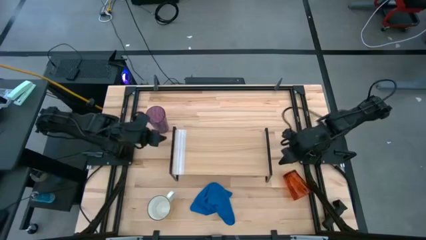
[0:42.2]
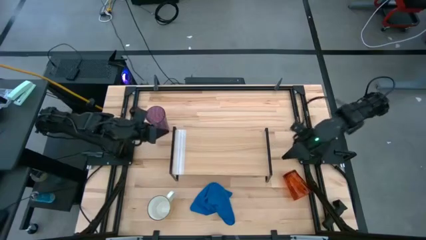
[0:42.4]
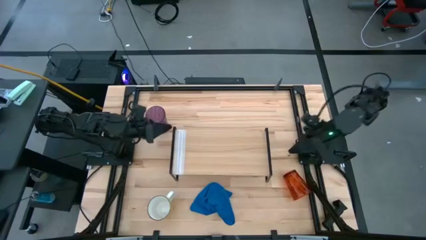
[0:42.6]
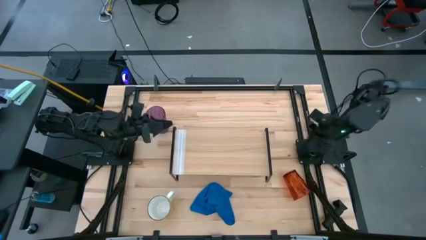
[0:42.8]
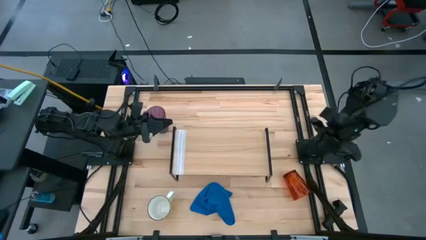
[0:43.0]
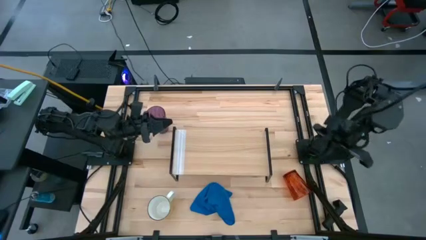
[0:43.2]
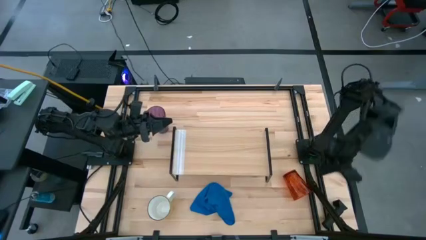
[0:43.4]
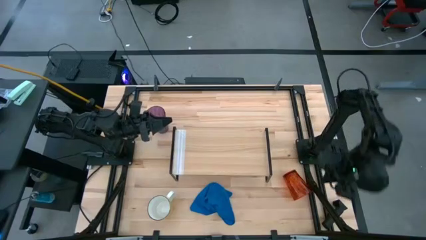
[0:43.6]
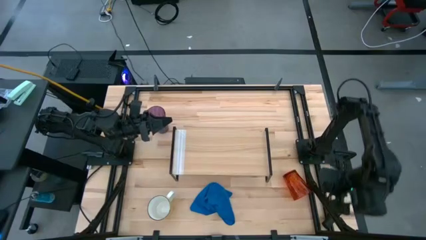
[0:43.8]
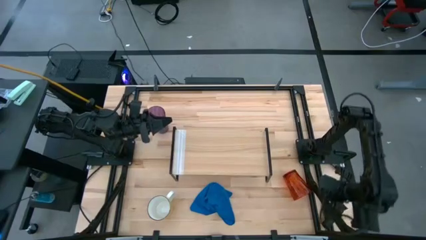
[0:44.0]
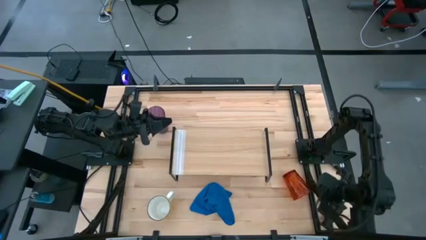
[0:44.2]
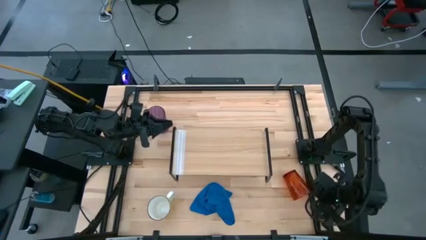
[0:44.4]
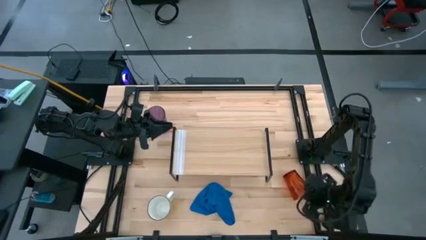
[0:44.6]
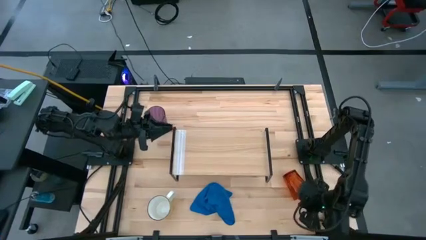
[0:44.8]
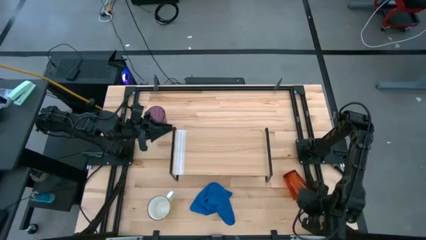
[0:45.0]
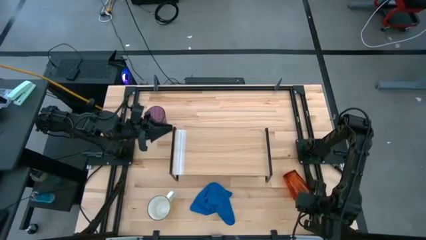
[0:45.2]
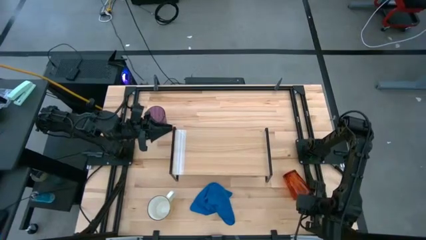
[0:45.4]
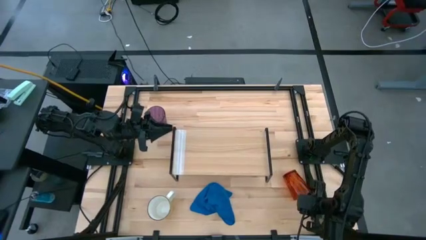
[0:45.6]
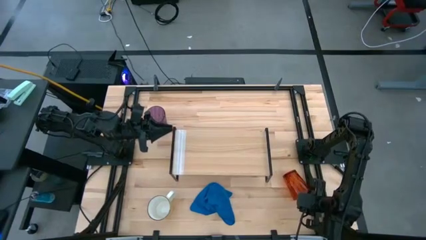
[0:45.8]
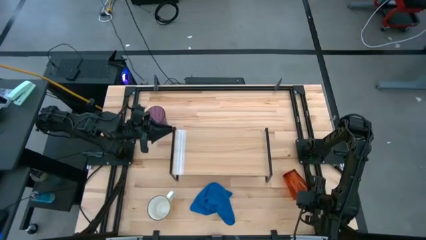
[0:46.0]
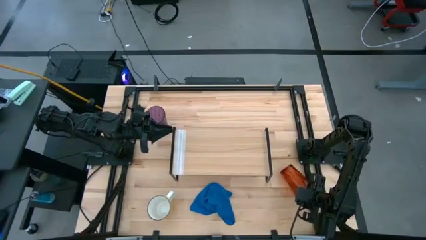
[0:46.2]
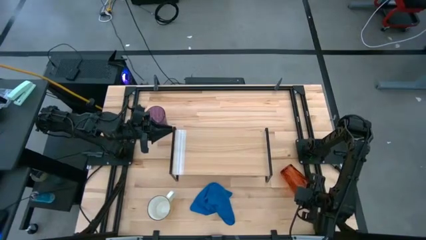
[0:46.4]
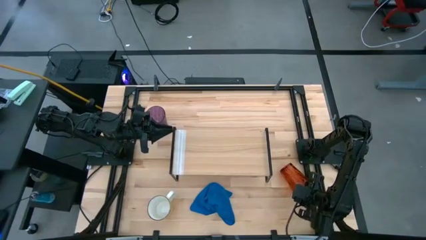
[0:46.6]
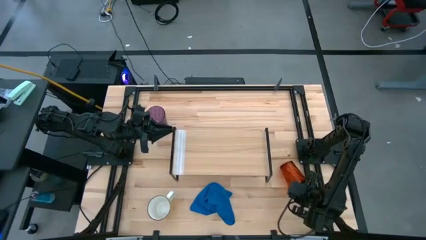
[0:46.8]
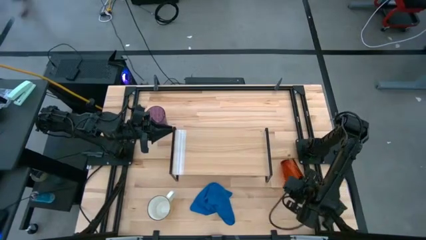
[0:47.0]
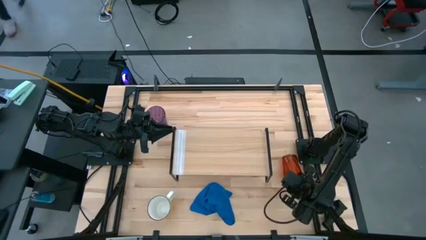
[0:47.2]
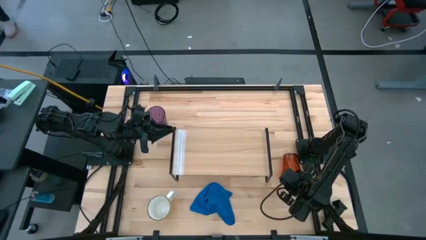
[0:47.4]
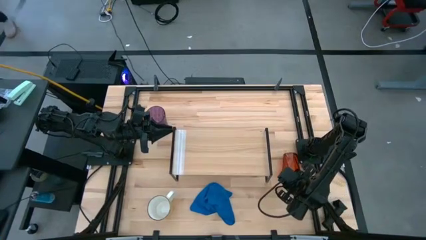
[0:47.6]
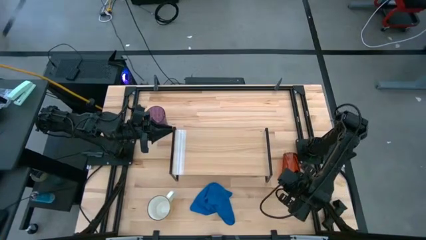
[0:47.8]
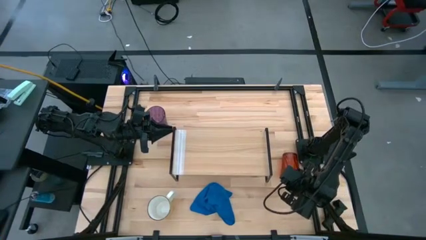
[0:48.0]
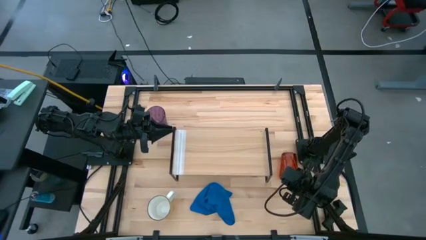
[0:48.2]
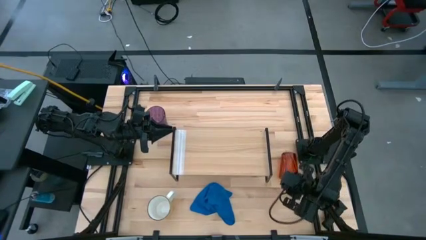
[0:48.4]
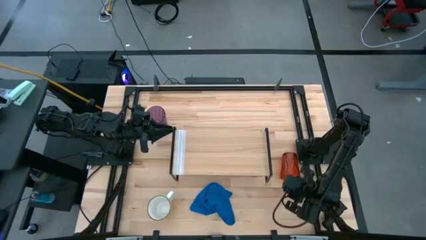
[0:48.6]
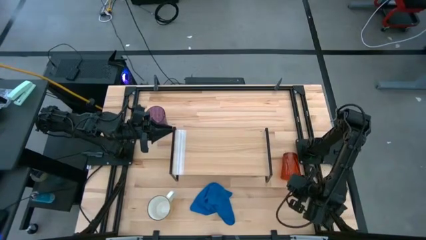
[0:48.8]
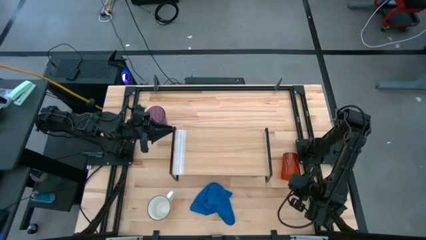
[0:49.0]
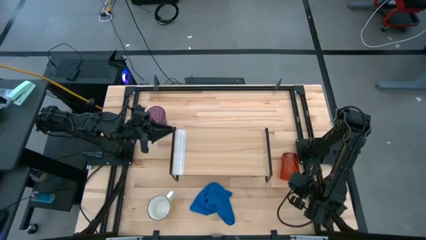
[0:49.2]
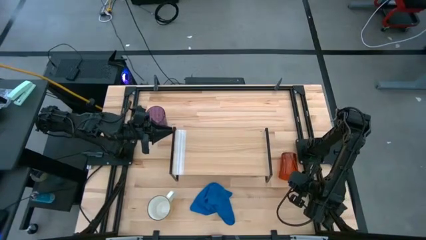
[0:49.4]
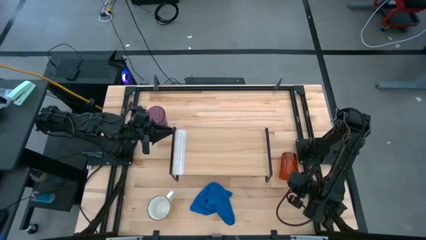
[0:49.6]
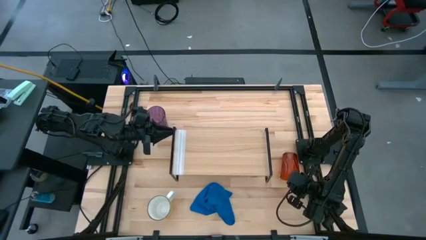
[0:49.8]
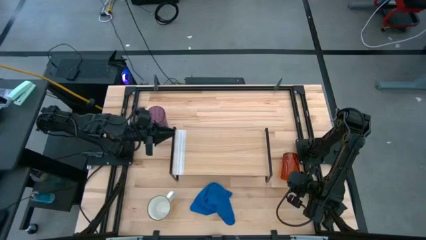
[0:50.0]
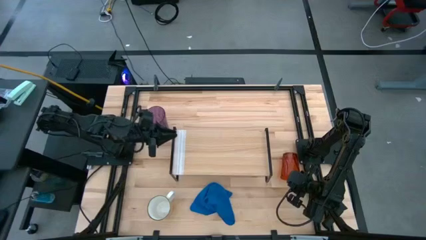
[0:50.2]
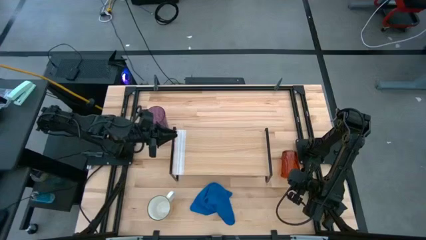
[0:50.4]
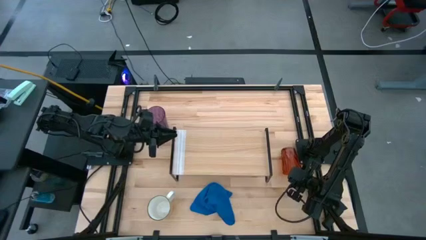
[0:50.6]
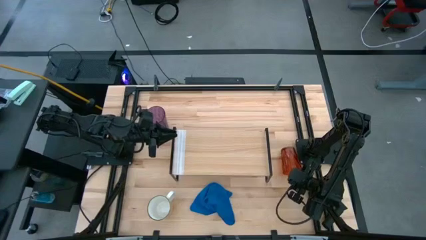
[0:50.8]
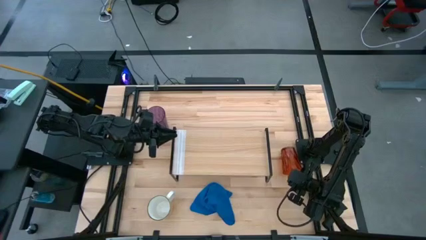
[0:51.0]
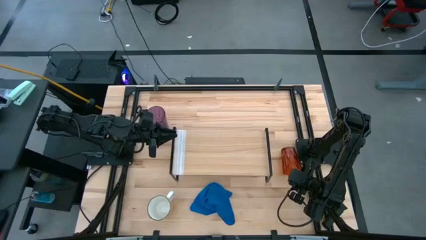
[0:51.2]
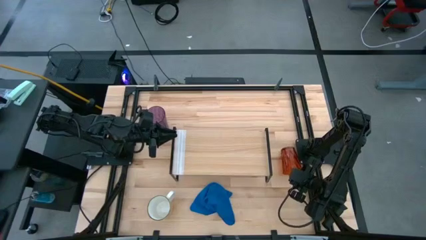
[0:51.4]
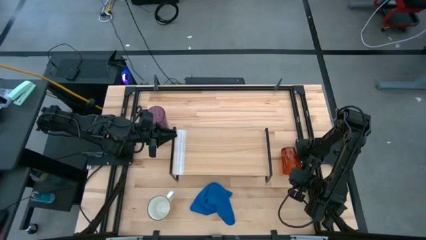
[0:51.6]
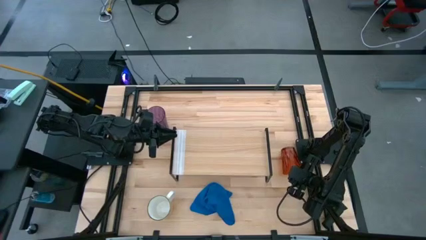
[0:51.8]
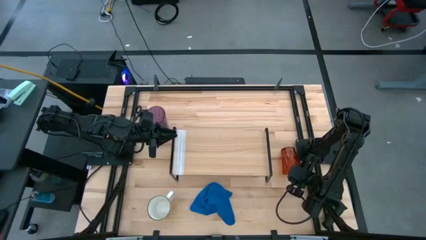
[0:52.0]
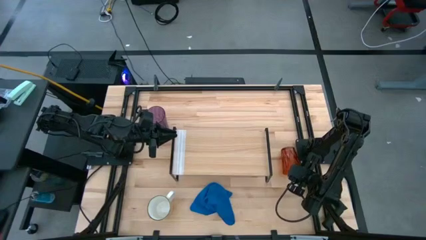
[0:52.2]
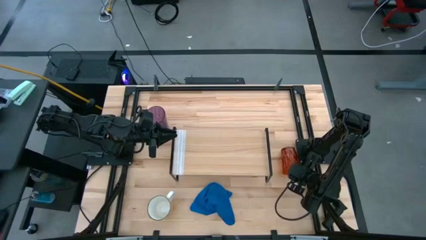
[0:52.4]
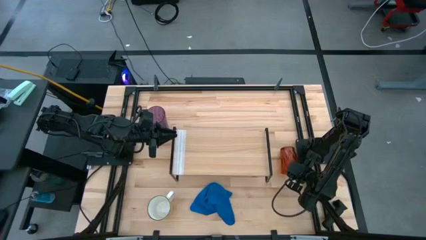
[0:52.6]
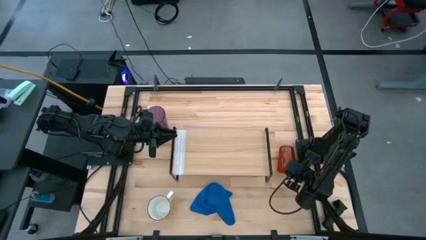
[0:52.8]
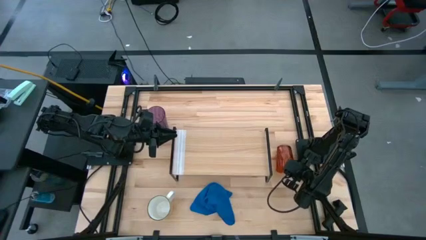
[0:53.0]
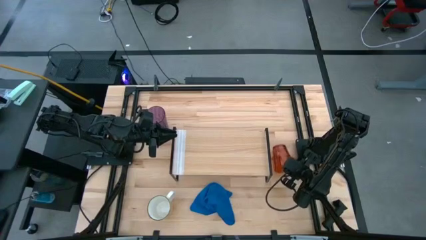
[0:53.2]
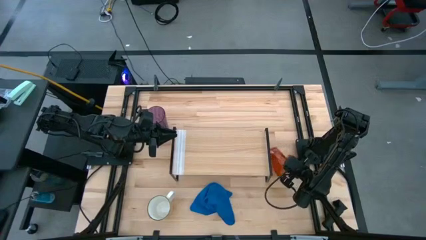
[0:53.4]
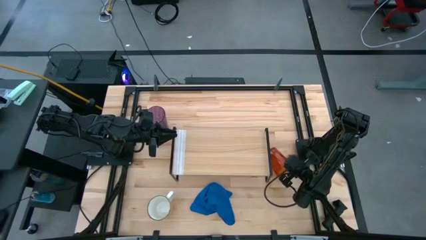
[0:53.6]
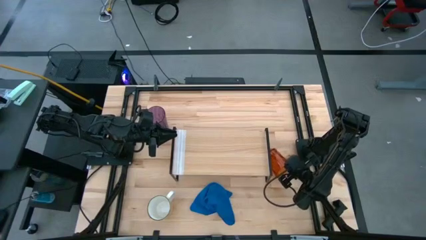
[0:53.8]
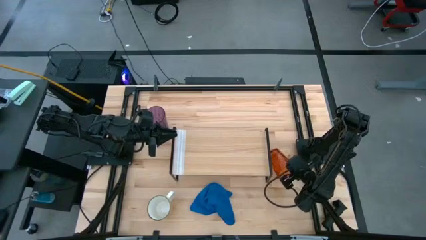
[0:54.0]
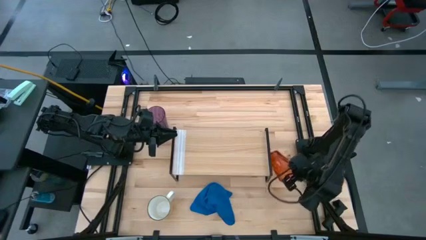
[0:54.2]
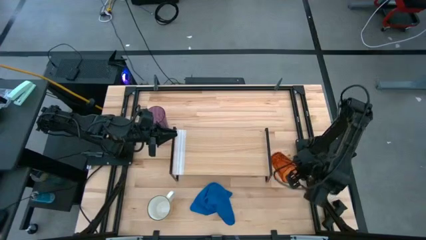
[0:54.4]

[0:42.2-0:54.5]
Task: Stack small to large cups/mugs on shelf
Put the orange cup on the shelf
